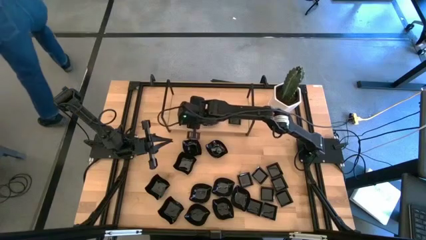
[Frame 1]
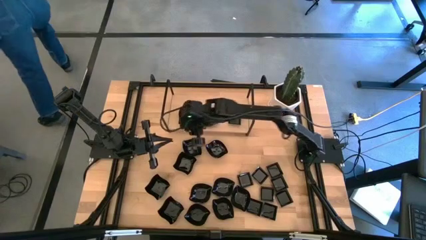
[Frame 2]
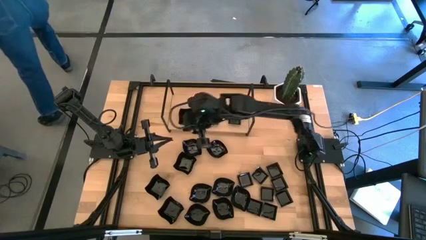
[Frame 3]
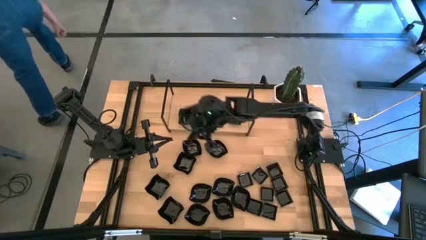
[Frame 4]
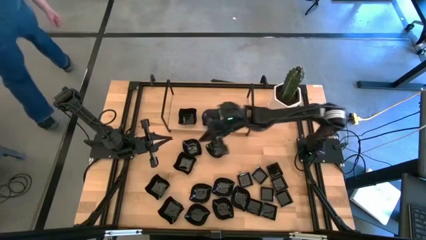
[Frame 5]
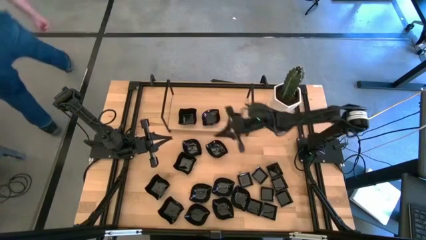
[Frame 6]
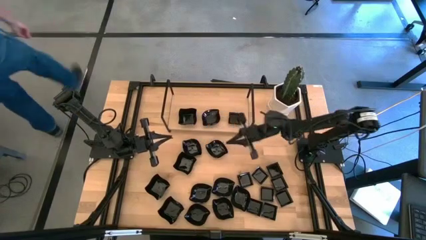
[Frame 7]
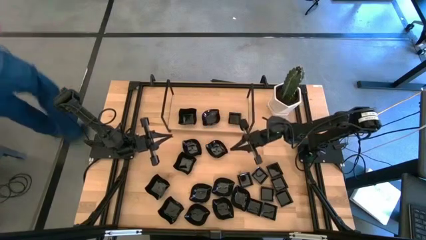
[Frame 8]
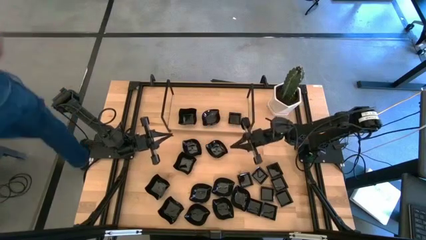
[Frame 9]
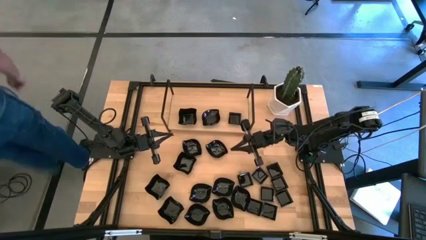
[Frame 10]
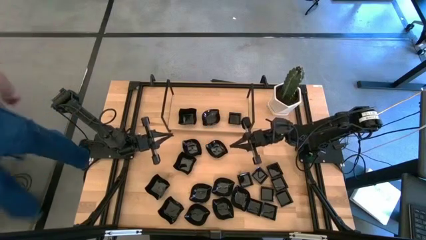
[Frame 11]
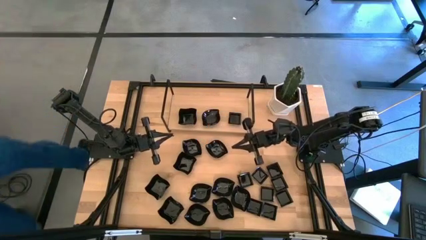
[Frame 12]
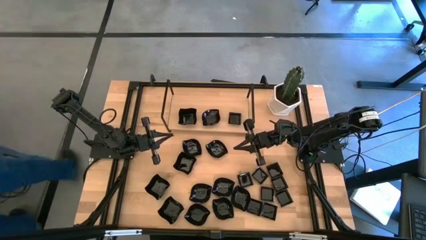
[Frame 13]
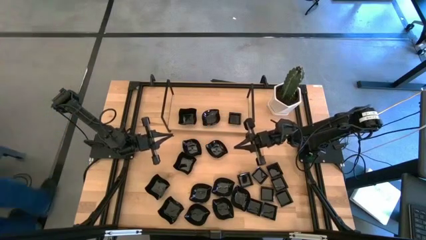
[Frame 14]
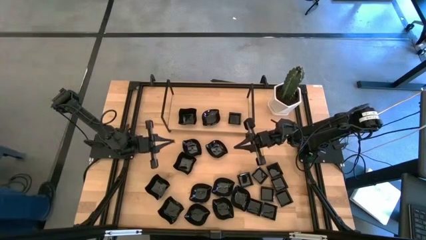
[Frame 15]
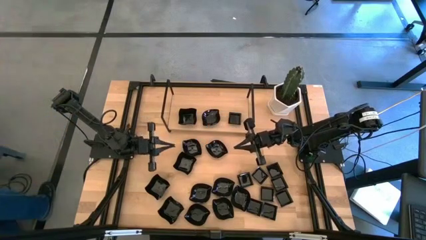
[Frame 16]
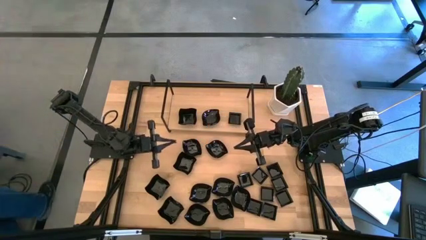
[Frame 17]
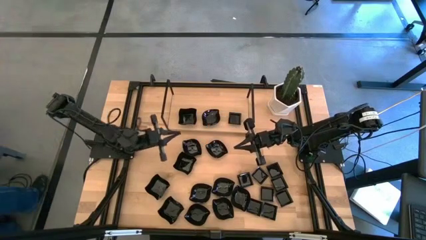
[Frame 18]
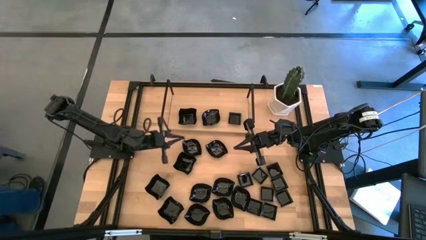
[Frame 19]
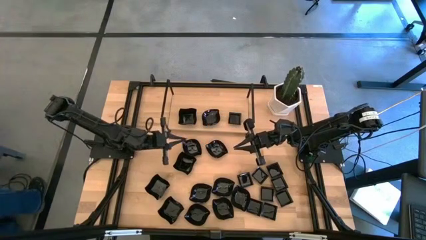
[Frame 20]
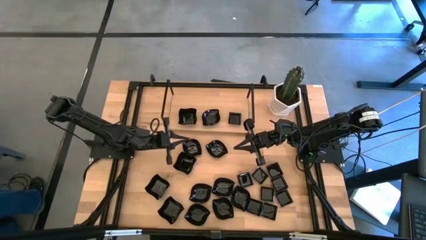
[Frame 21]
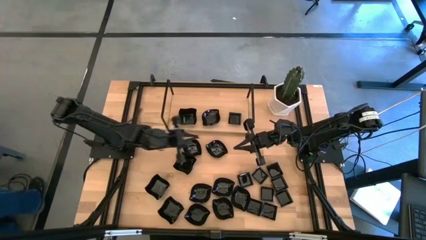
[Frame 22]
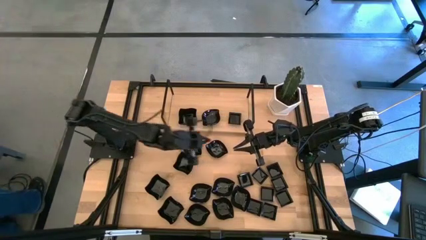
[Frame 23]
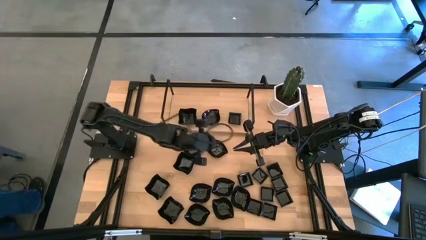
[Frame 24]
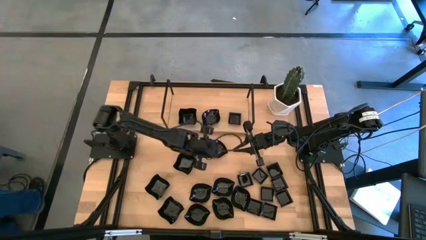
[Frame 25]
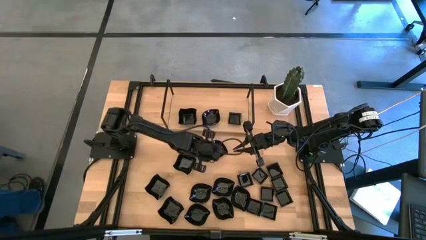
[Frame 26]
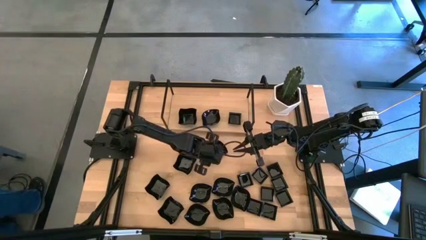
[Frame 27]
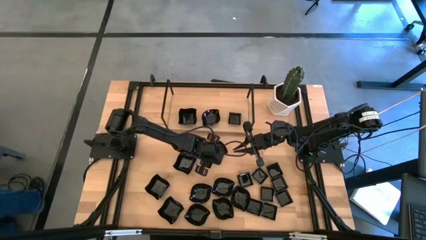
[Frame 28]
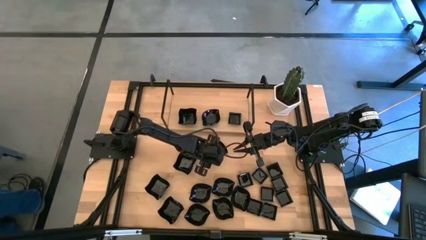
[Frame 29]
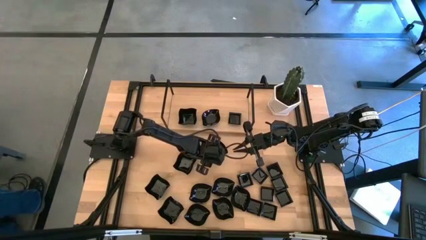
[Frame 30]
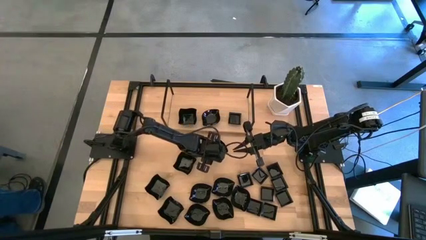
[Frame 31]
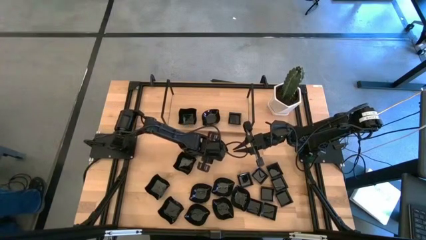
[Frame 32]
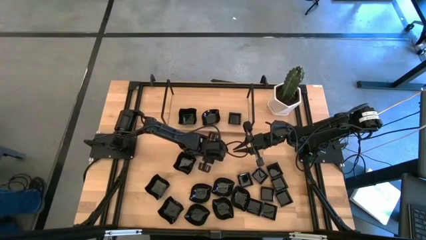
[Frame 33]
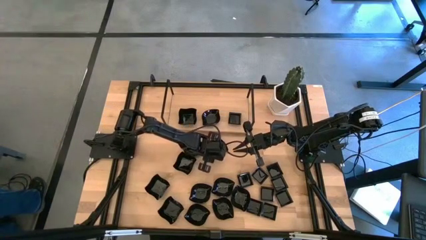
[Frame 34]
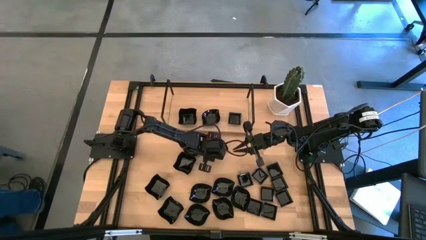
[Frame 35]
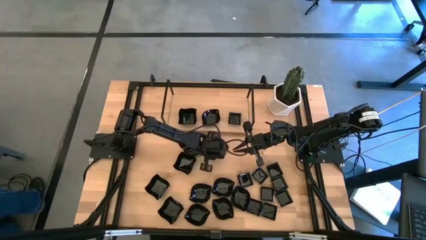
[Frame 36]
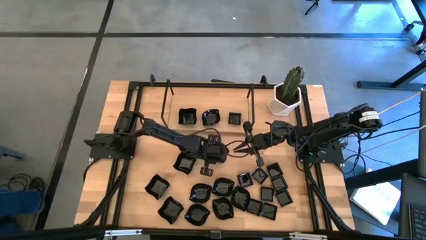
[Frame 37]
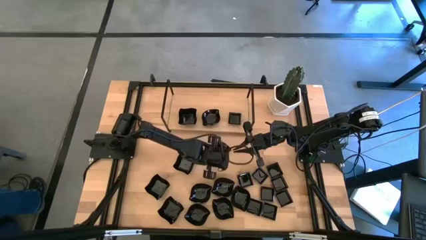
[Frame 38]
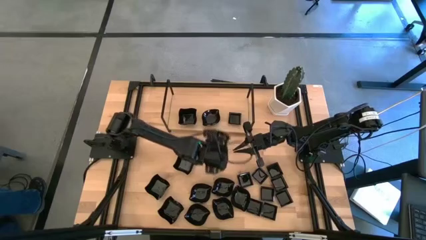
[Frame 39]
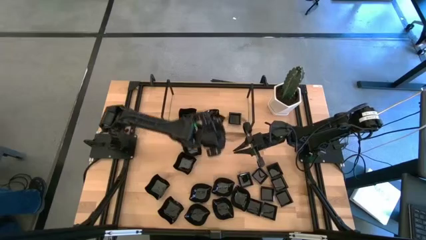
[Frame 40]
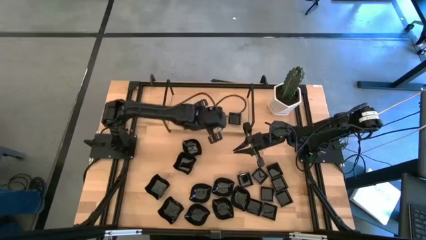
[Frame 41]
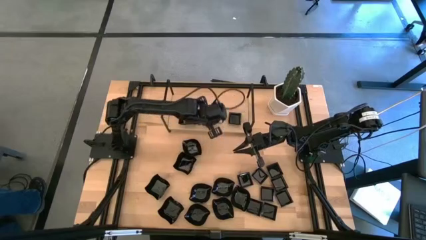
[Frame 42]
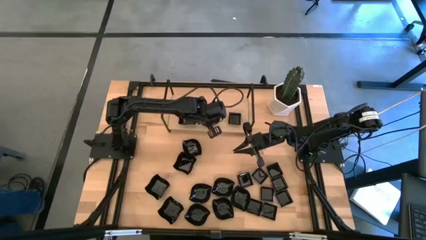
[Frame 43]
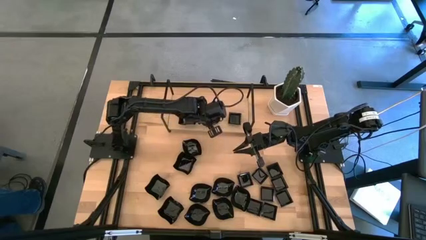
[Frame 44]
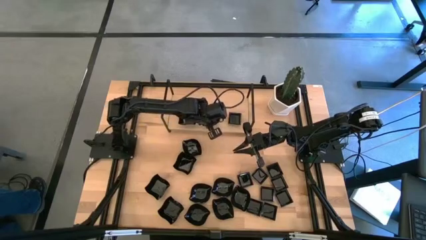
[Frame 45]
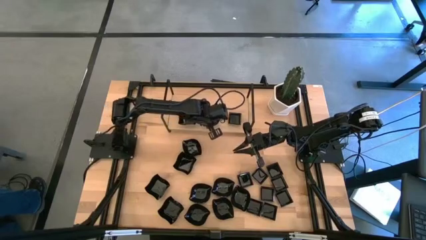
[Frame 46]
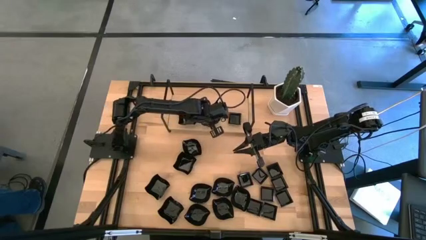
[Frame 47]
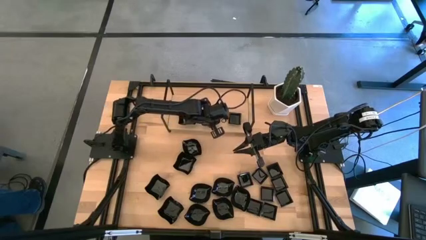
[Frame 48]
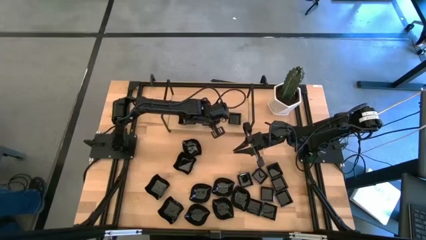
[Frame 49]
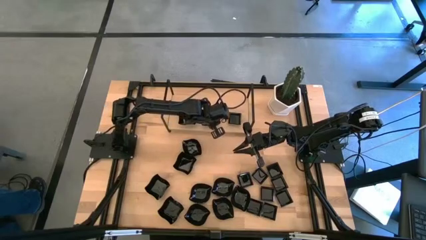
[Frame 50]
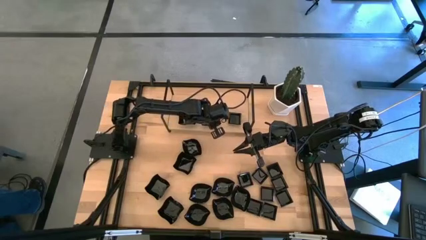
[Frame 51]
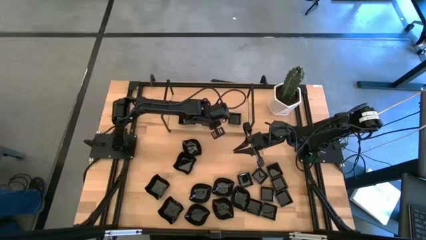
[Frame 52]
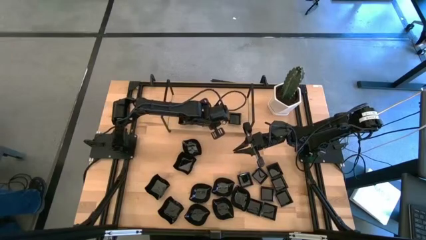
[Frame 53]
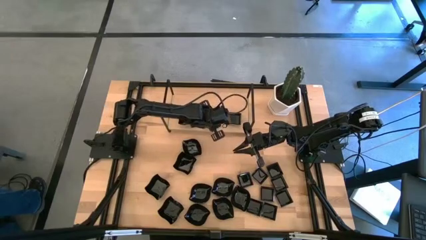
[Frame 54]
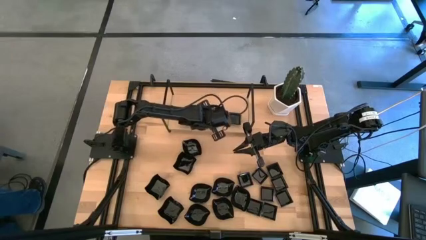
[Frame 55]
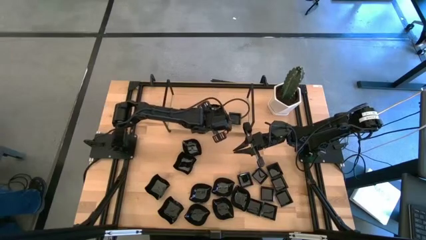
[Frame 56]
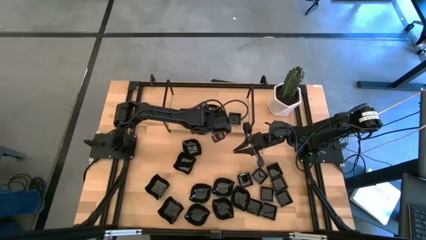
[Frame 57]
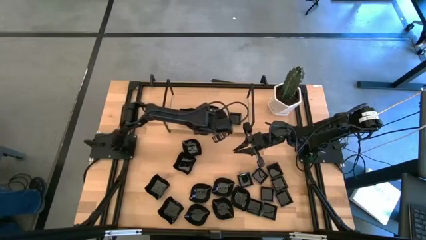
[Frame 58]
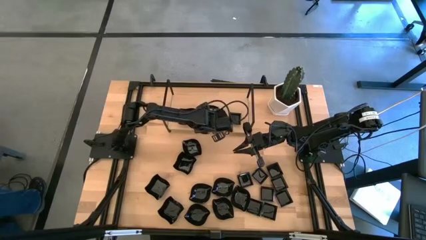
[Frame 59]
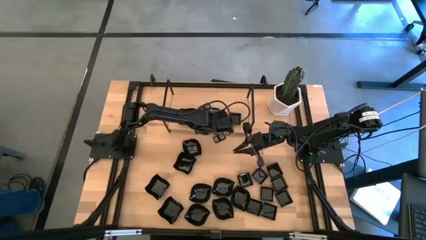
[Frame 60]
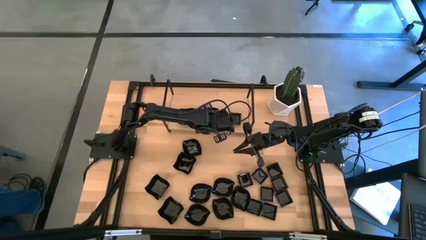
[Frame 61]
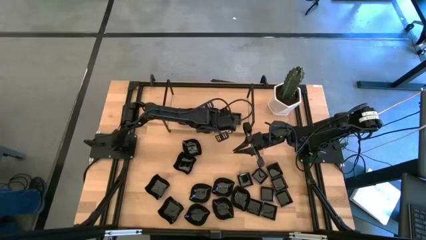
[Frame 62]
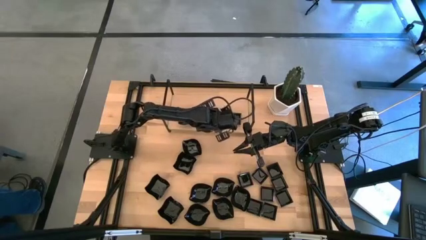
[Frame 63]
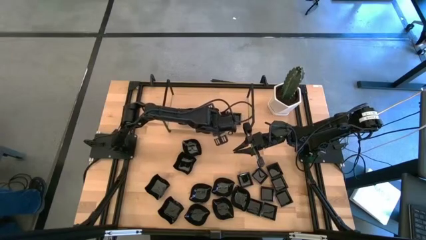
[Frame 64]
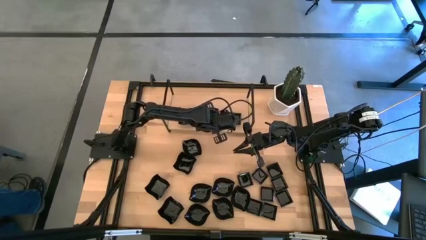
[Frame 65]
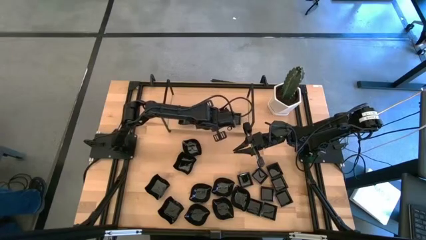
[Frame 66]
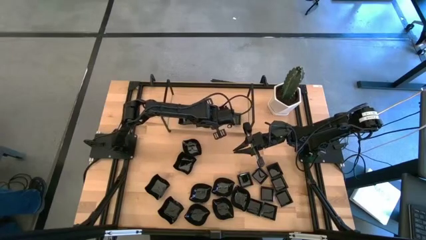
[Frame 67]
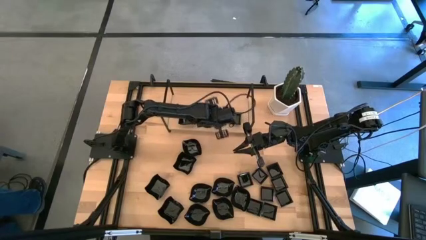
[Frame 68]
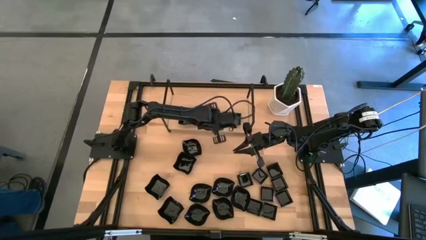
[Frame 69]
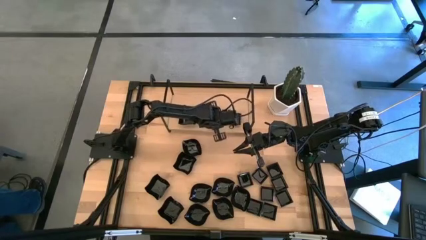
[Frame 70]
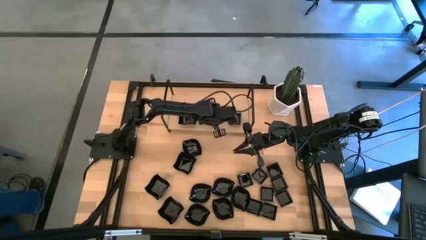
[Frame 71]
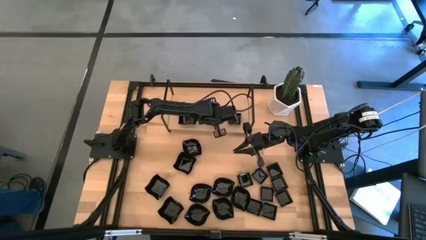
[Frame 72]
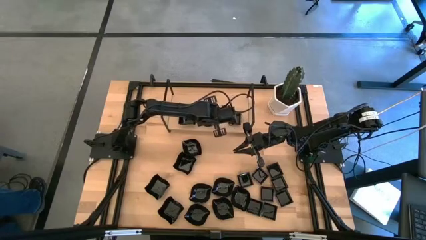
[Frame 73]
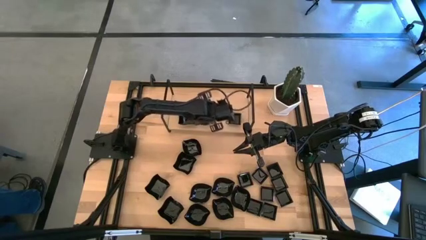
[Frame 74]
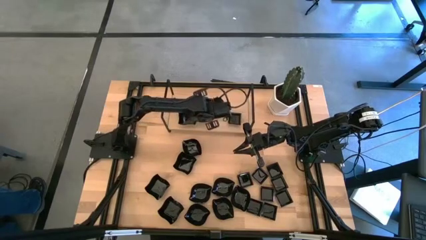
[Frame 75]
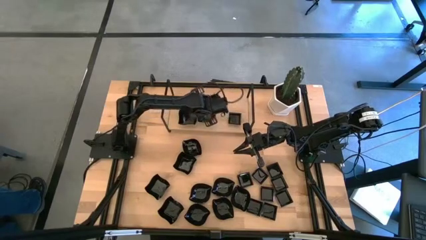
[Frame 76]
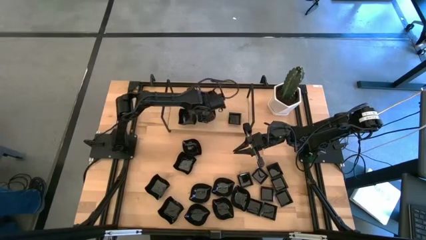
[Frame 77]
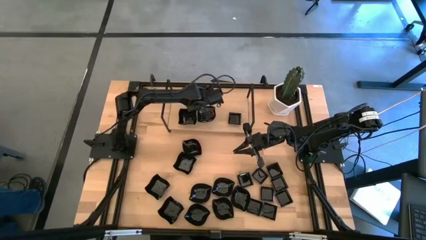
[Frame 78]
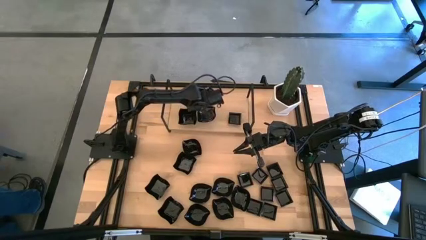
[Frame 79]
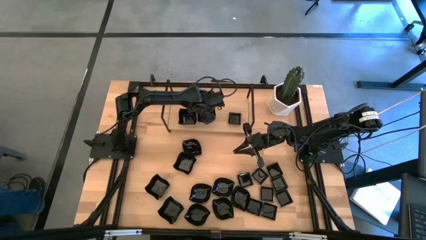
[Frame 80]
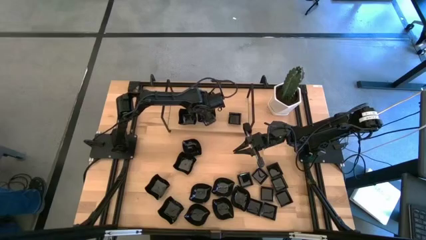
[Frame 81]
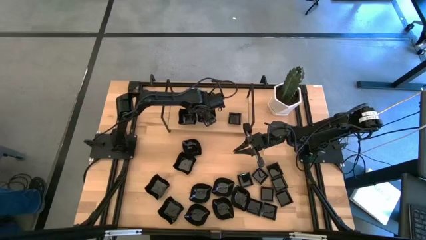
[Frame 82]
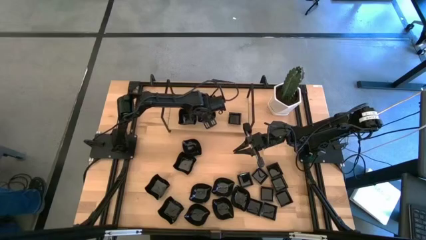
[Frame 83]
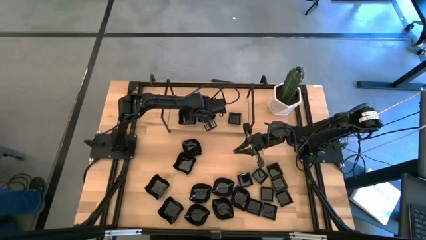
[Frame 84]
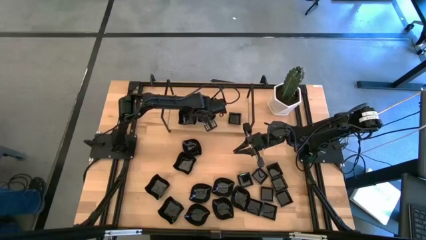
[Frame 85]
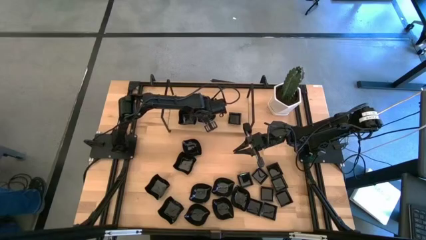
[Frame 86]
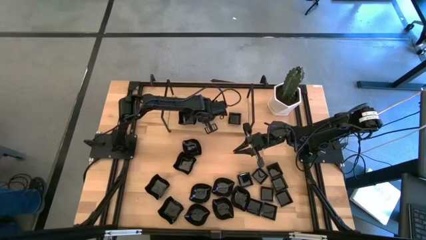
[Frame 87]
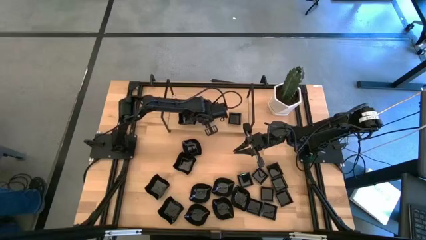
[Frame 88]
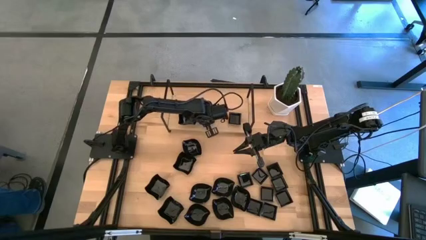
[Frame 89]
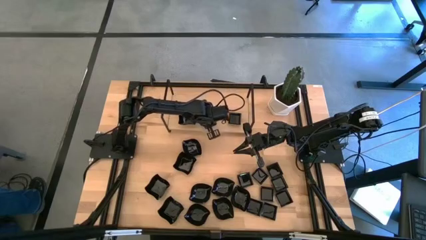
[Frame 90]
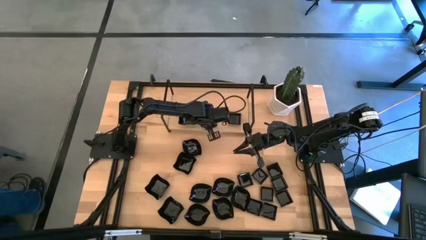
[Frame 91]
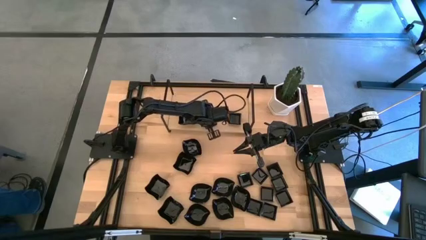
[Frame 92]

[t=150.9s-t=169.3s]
Task: Pick & Place Mini shaped plates
Stack the leaf-shaped plate on the top of the leaf-shaped plate on the shelf
